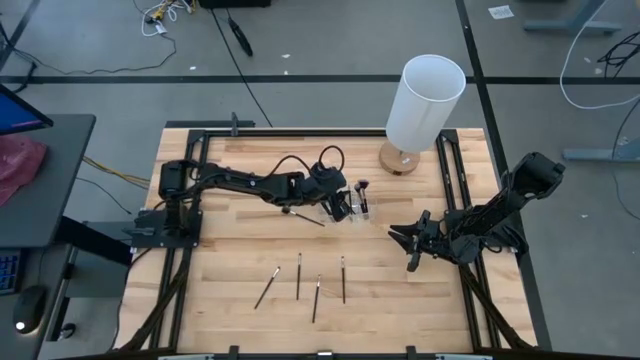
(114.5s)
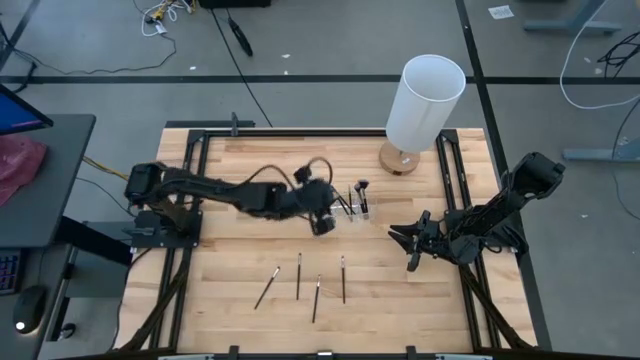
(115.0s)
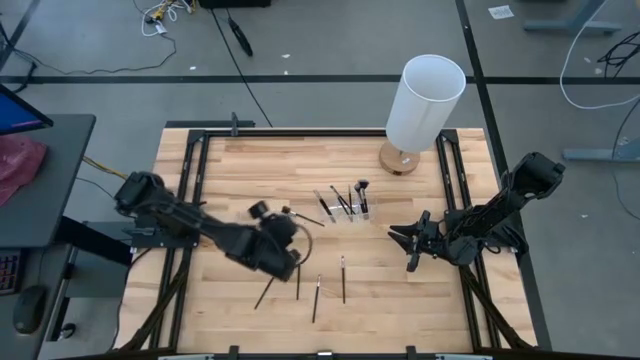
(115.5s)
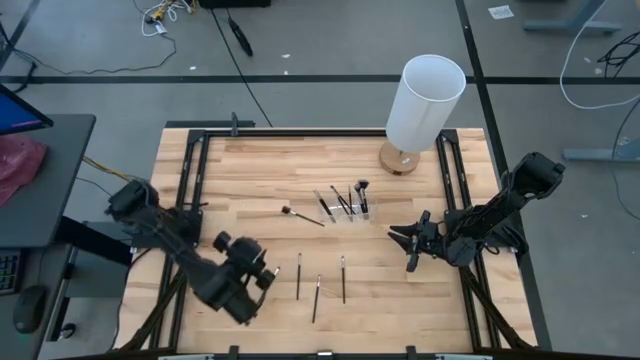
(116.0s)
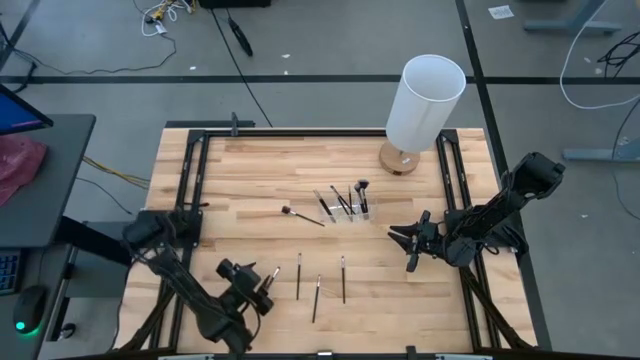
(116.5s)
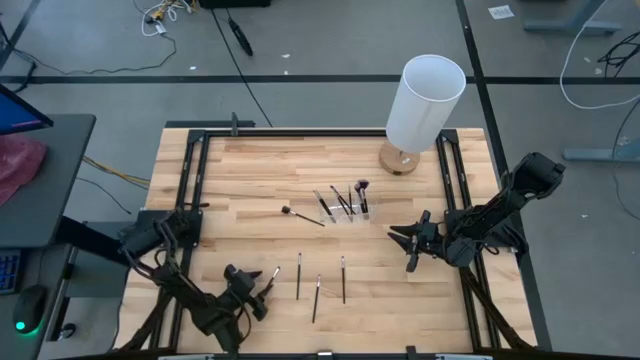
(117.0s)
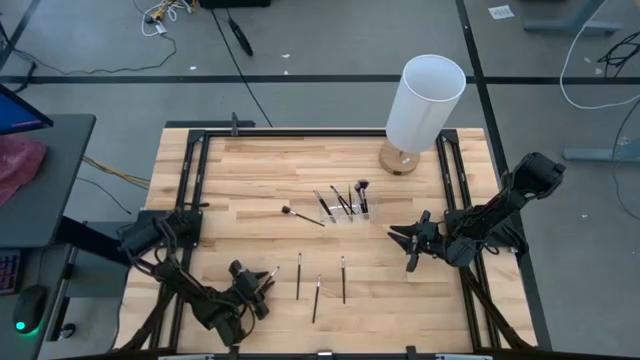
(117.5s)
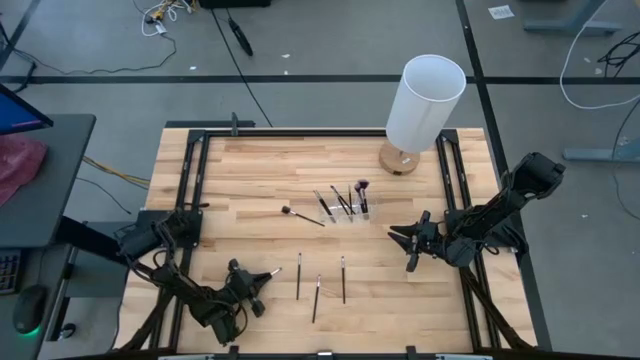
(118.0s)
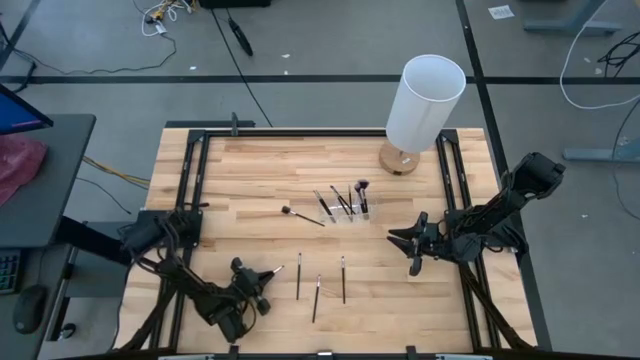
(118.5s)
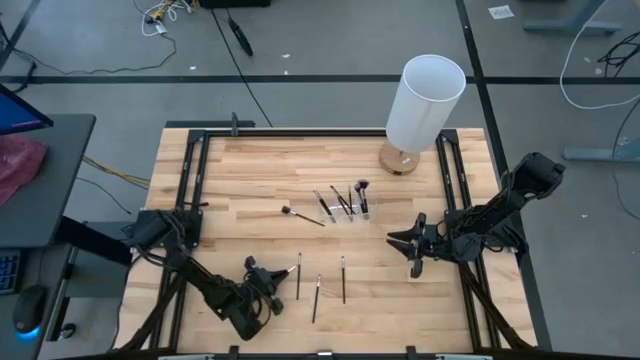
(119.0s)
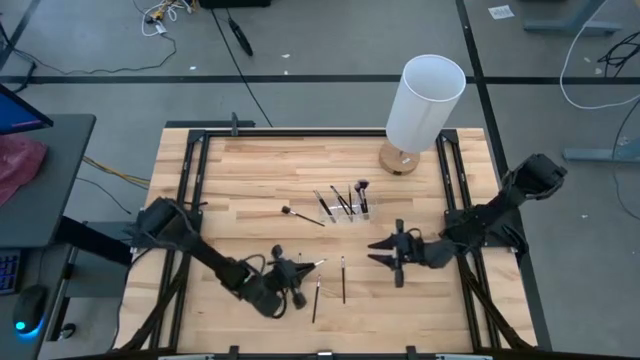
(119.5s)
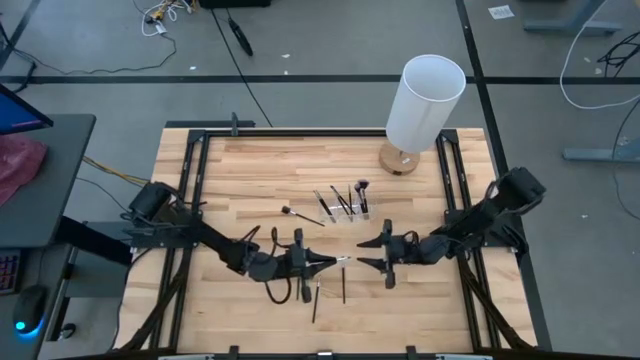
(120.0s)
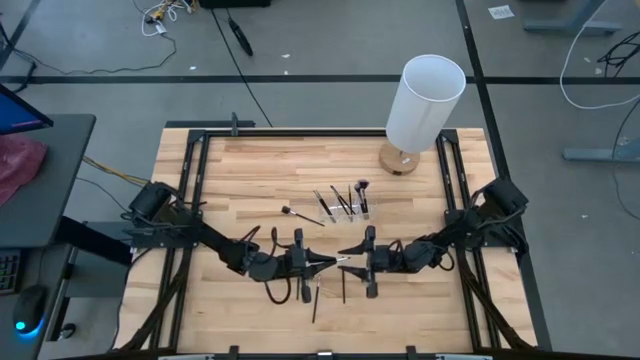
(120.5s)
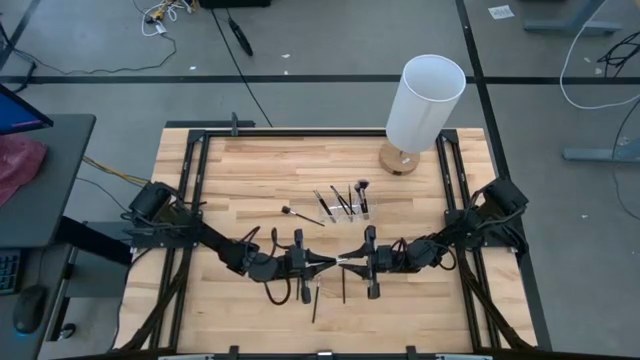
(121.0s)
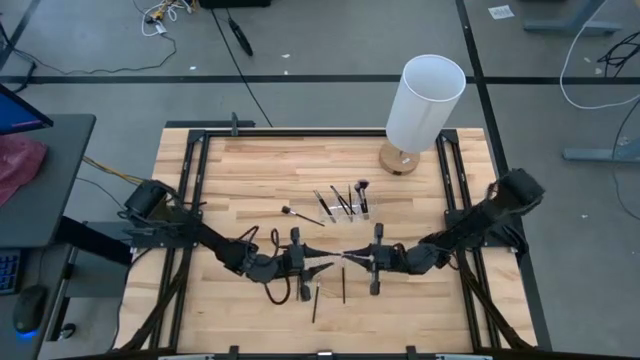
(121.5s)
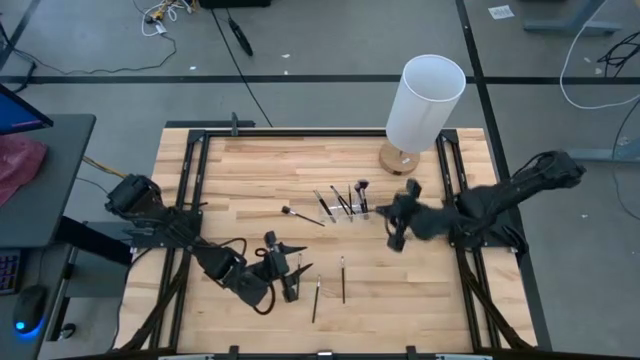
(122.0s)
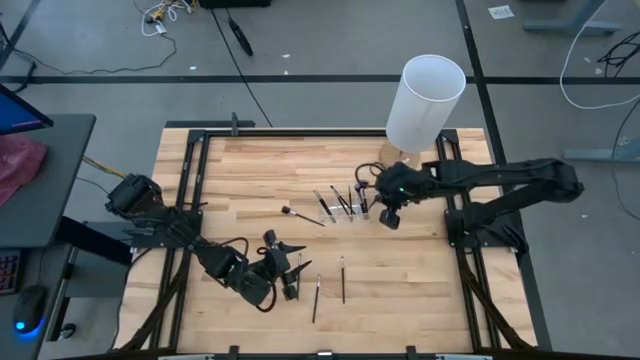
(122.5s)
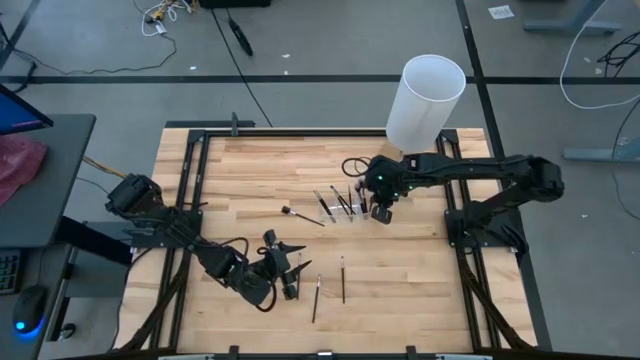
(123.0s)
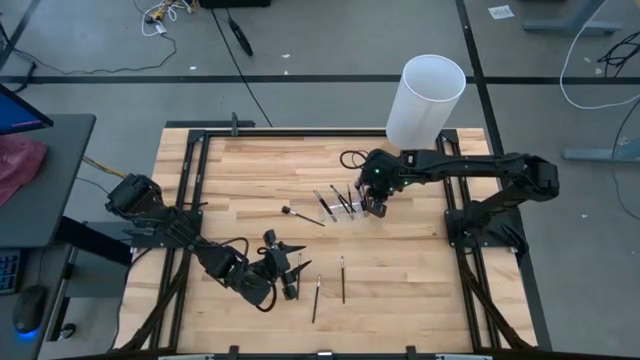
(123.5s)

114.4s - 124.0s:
Task: Pick & Place Makeup Supplies
Put the black makeup brush into the transparent organizer

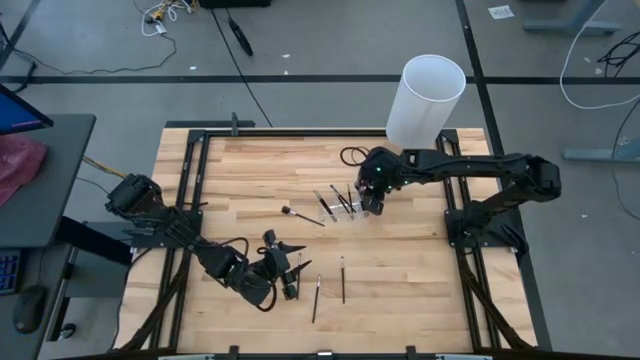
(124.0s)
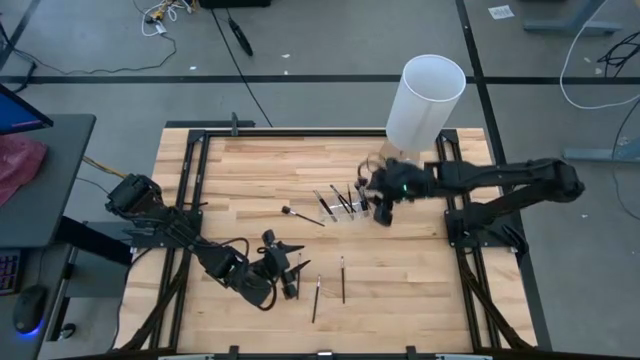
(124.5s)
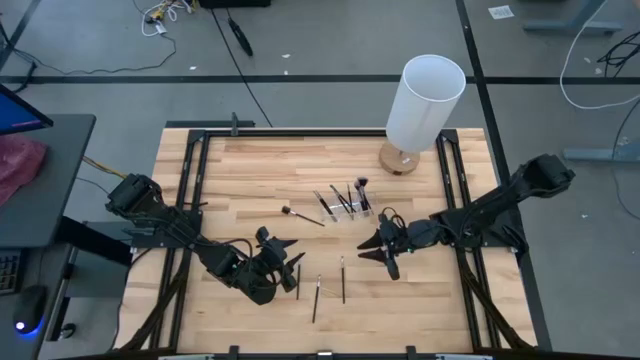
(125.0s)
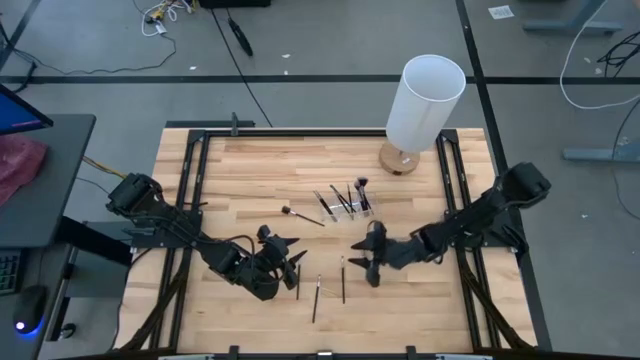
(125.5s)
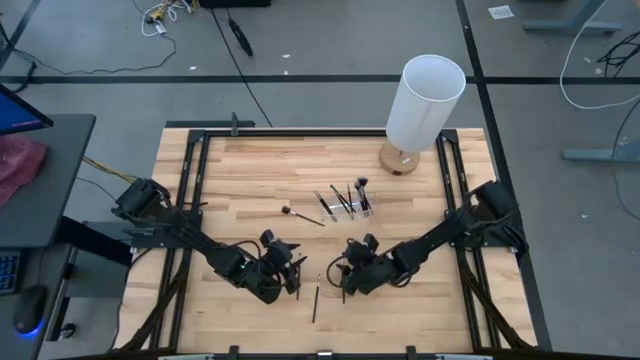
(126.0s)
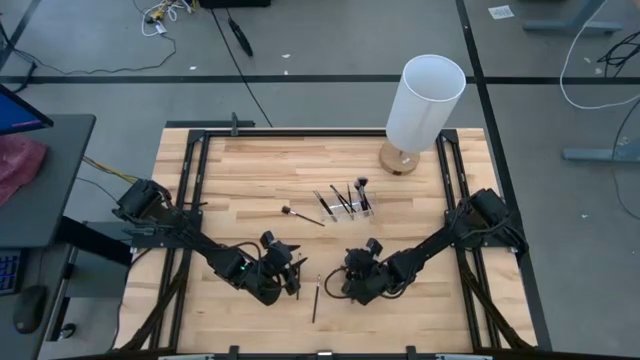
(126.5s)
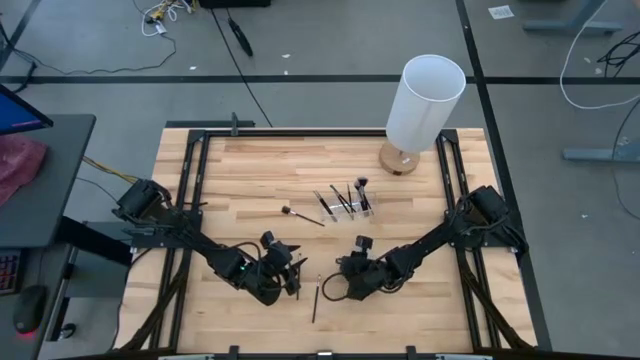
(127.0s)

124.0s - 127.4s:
Put the black makeup brush into the transparent organizer

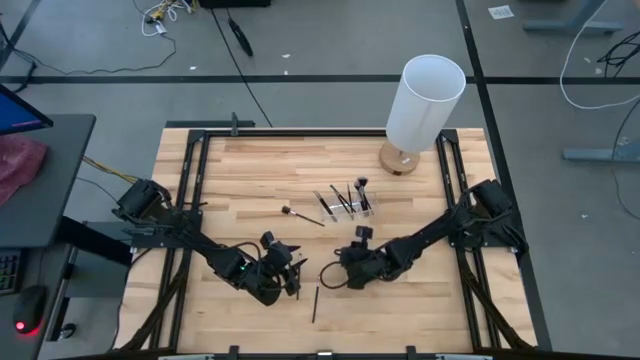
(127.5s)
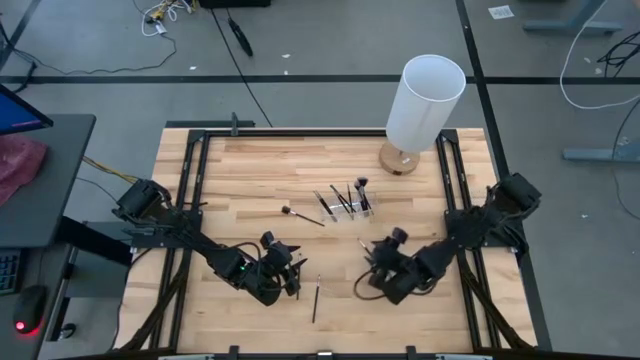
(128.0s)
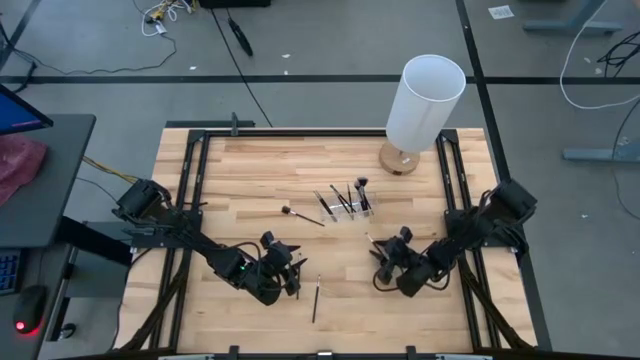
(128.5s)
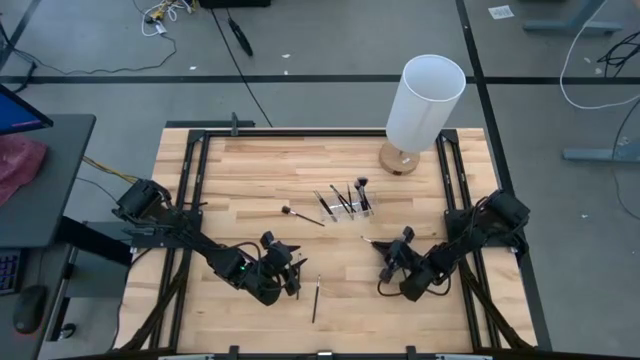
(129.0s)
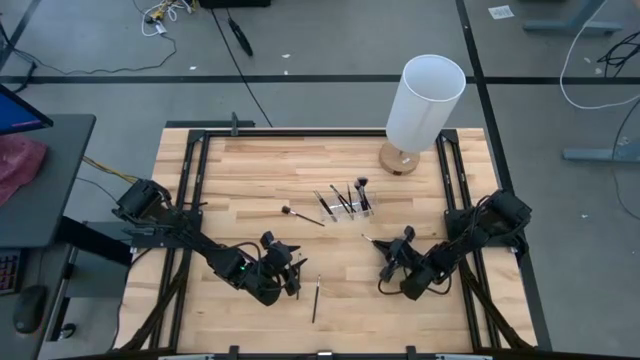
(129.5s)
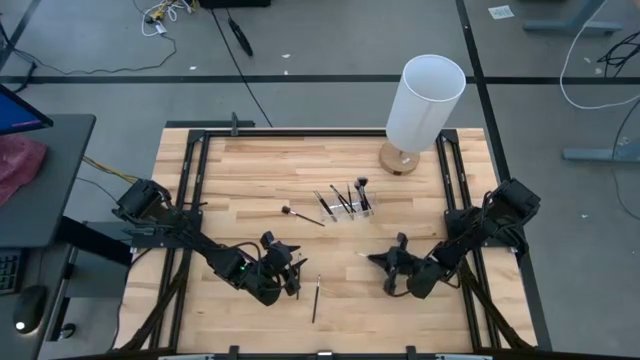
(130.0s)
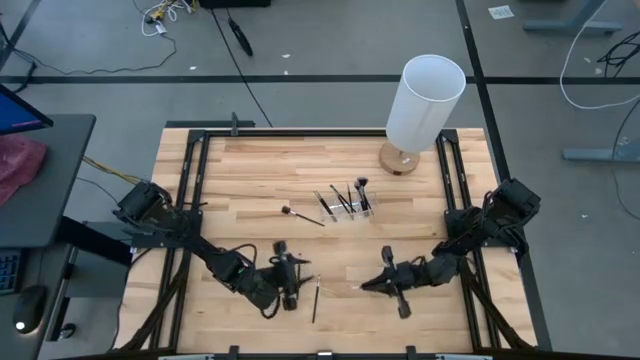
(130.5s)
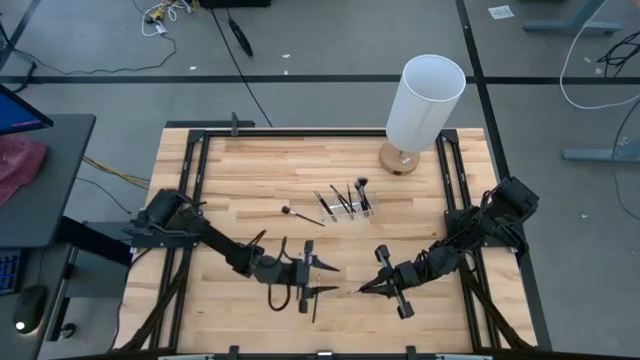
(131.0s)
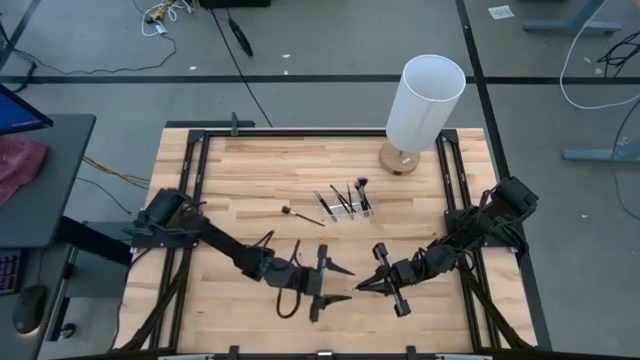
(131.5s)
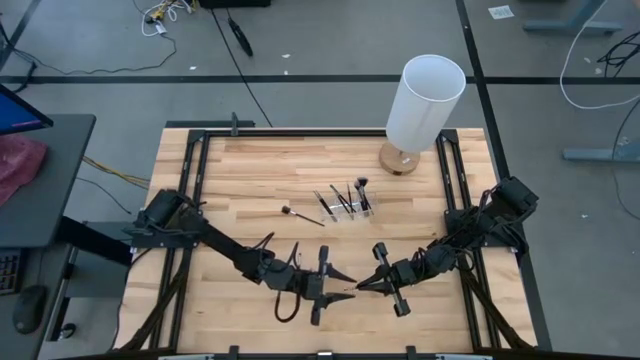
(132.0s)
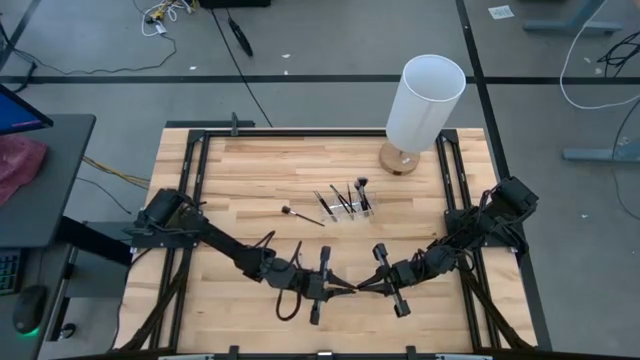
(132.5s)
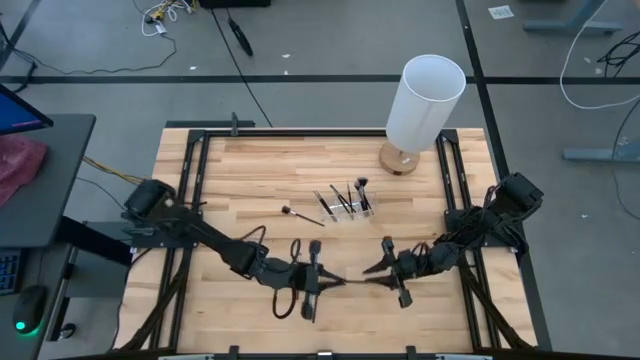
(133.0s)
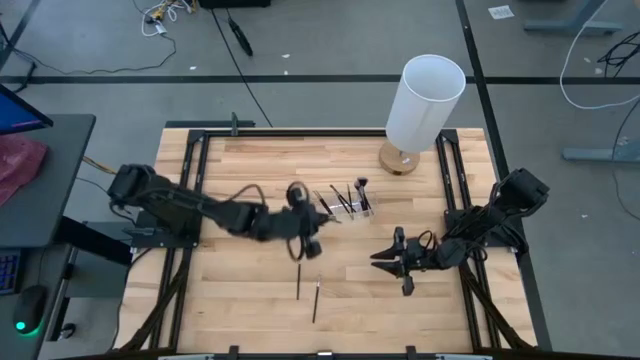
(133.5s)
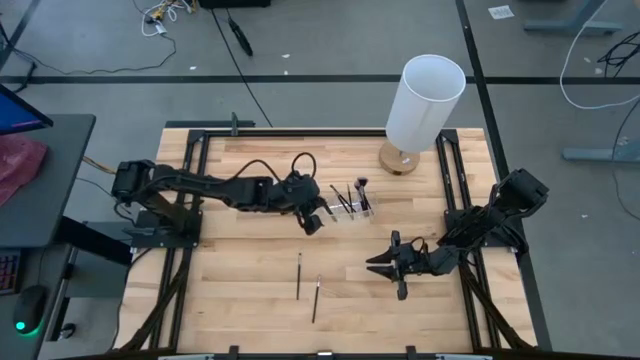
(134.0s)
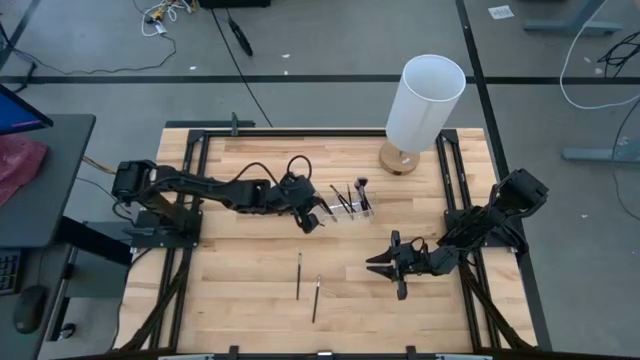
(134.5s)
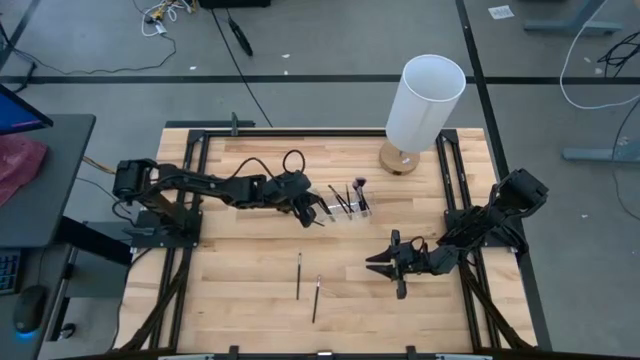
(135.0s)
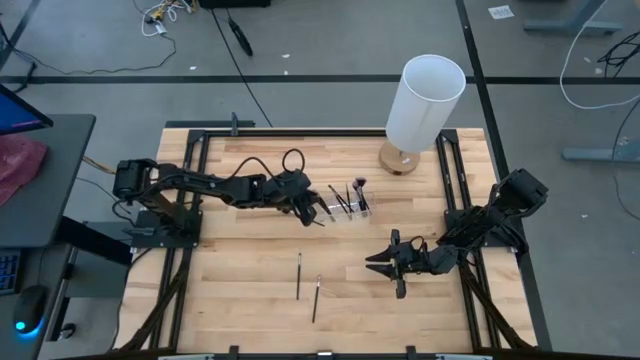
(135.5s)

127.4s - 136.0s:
Put the black makeup brush into the transparent organizer

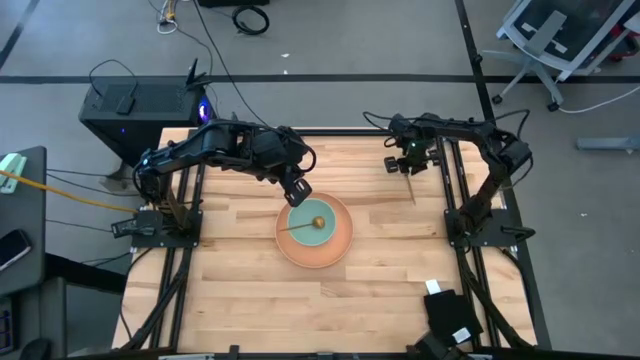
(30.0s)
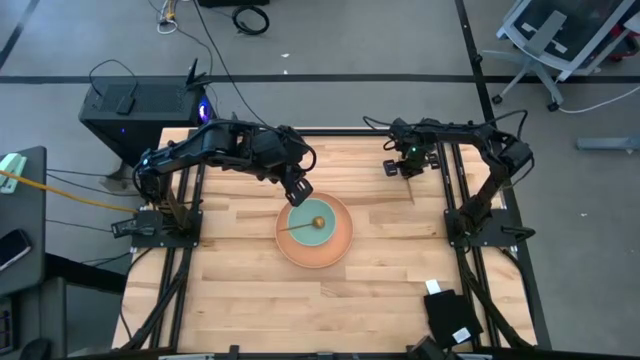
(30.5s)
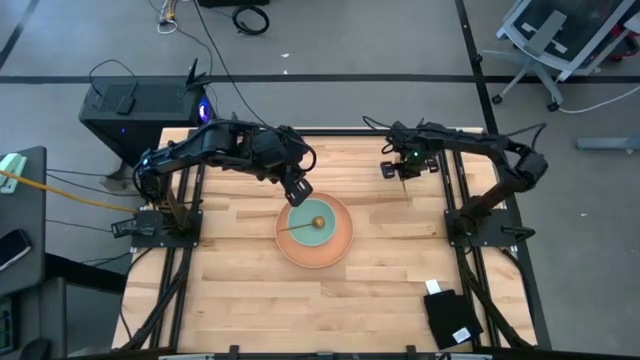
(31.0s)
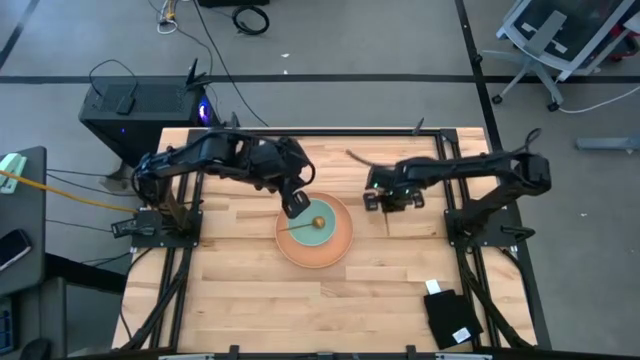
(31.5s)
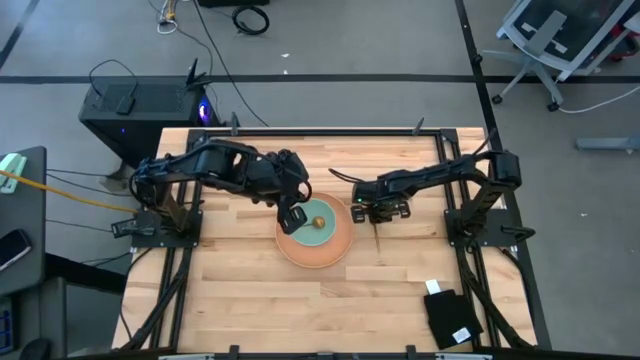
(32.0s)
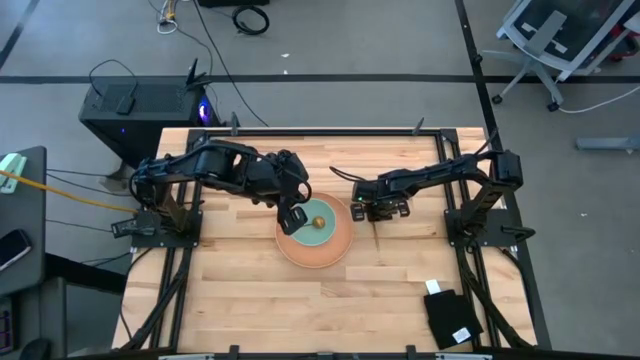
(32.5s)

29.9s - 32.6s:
Task: Set table place
Put the fork to the right of the plate on the table
